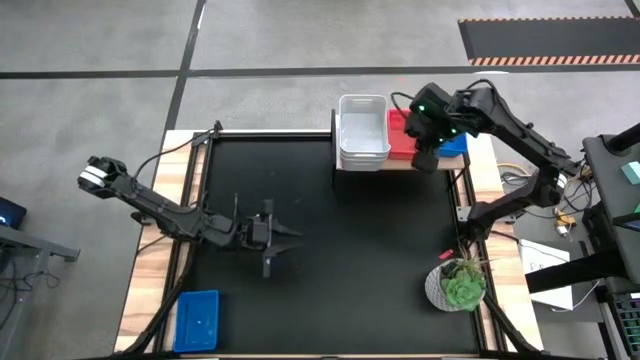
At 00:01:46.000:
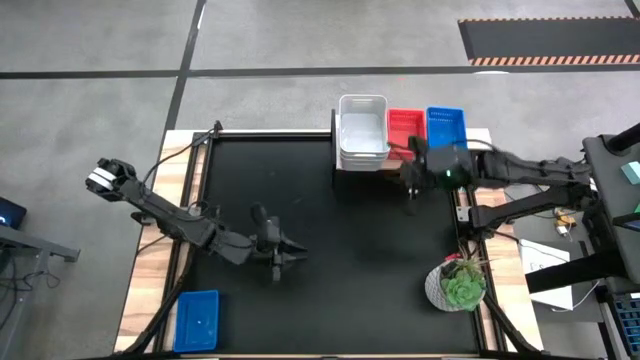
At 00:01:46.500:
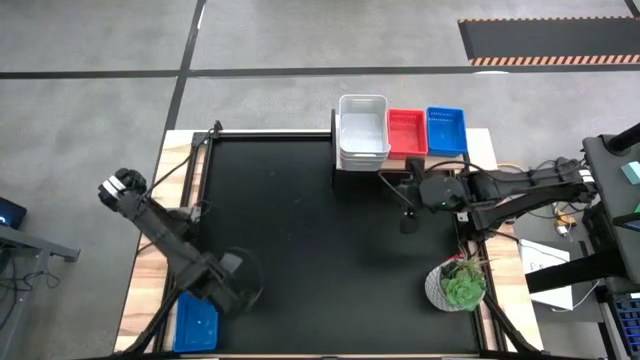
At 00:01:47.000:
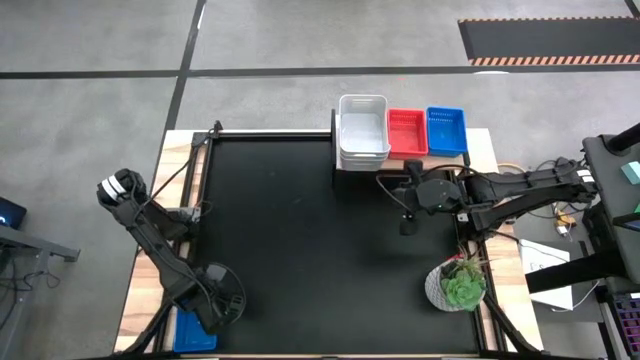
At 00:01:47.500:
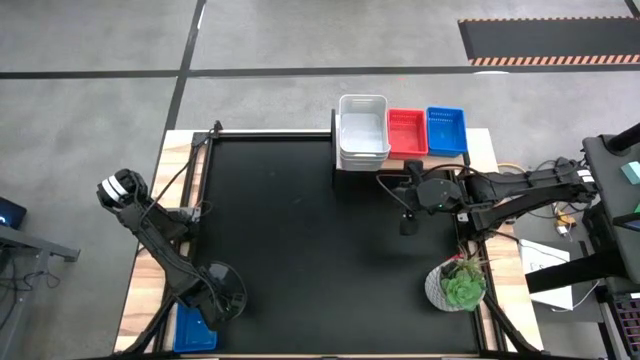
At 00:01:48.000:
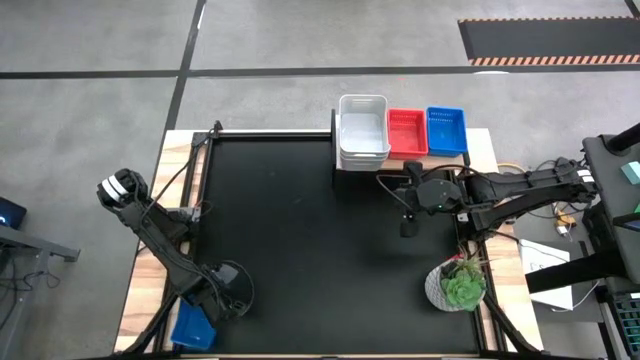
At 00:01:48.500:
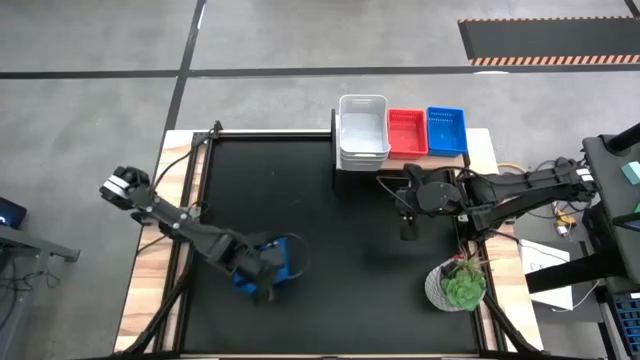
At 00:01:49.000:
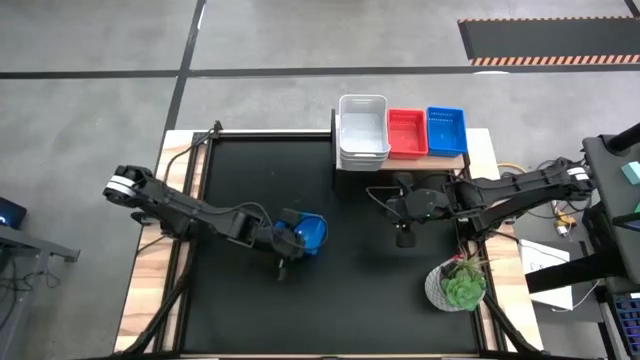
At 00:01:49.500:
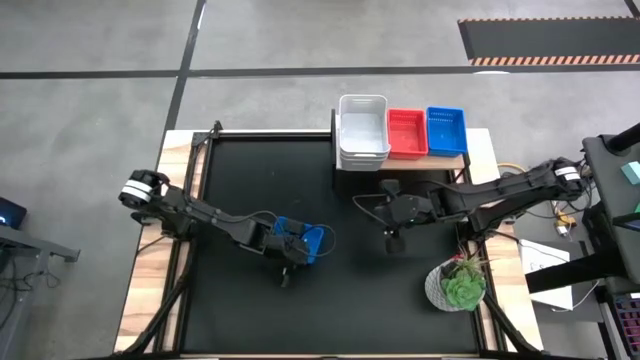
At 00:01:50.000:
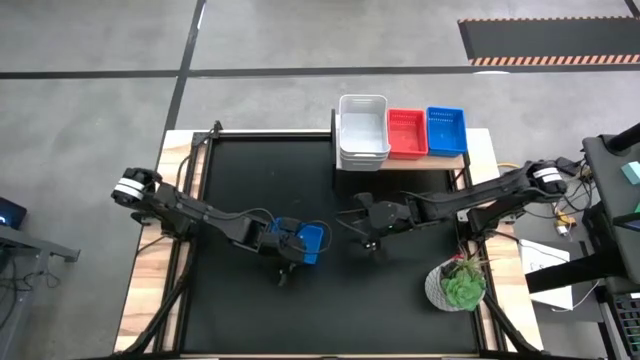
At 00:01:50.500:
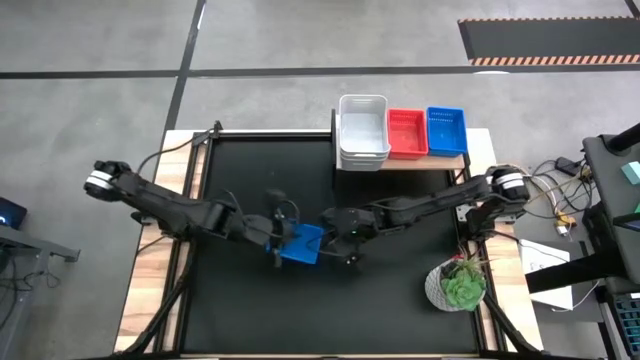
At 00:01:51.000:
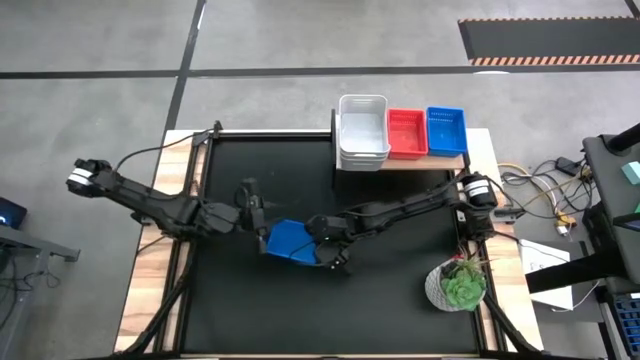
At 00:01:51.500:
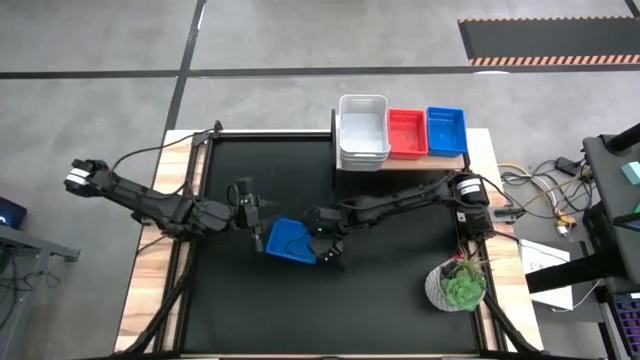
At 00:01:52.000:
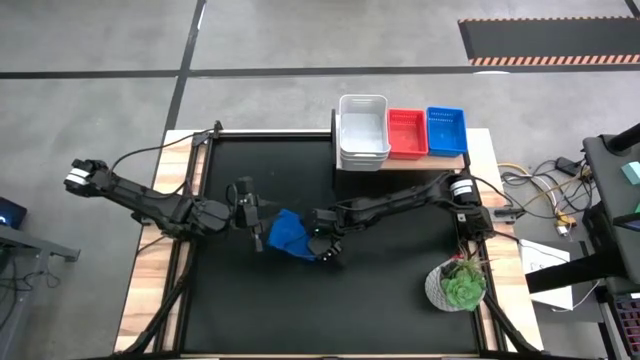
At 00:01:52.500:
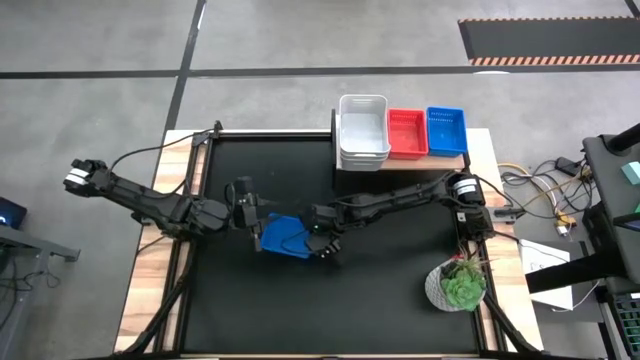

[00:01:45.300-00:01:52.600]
Task: Stack baskets on shelf by color
Stack the blue bin on top of the blue bins on the shelf

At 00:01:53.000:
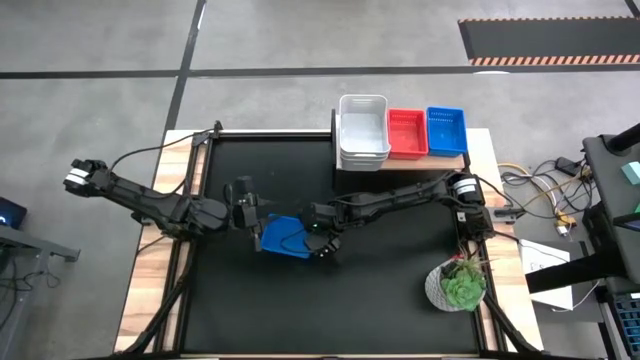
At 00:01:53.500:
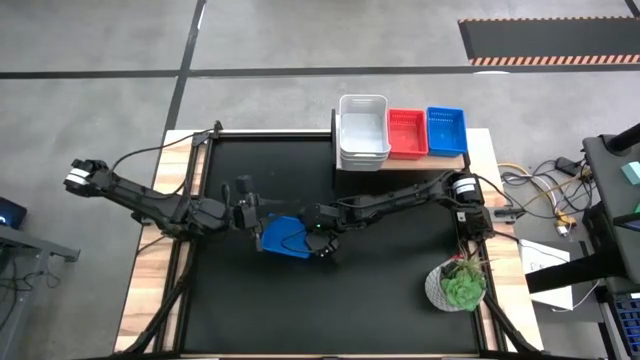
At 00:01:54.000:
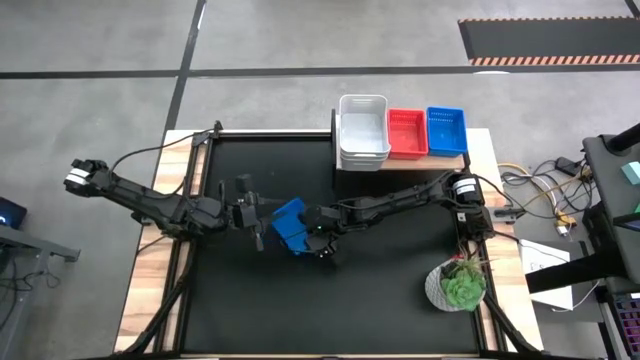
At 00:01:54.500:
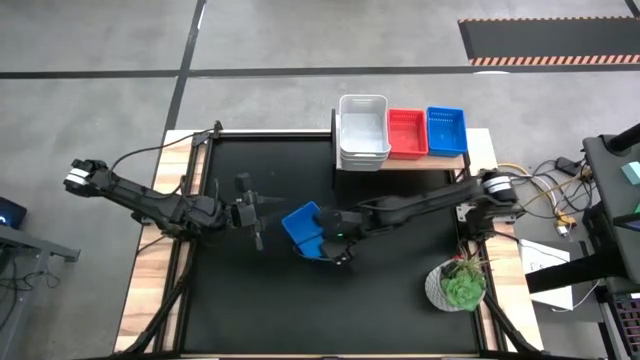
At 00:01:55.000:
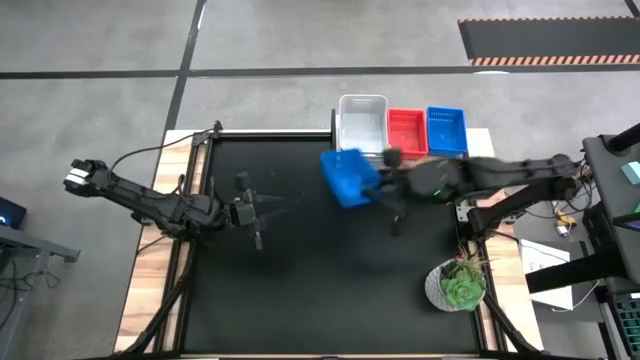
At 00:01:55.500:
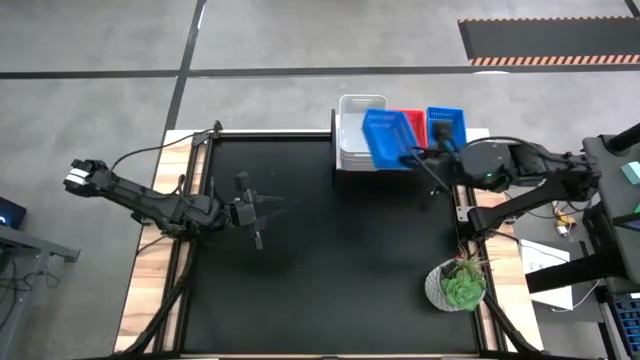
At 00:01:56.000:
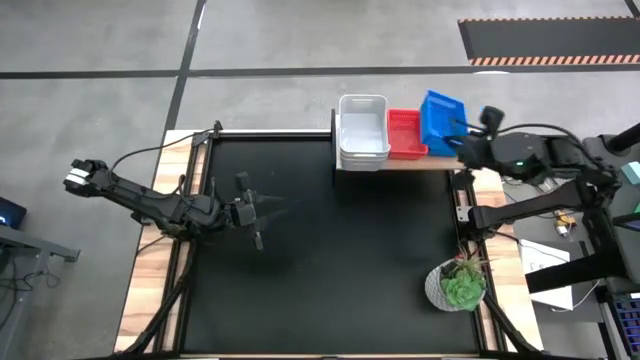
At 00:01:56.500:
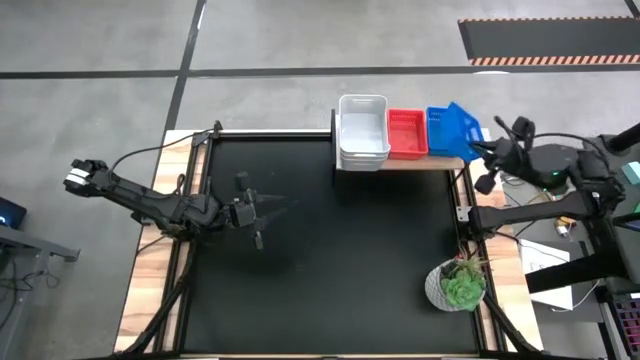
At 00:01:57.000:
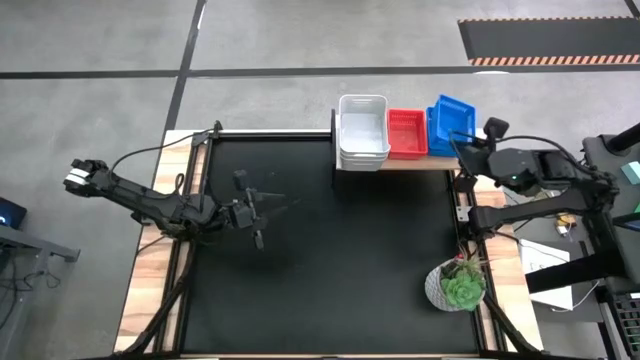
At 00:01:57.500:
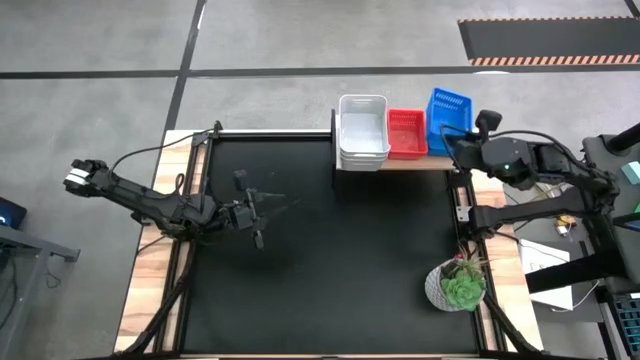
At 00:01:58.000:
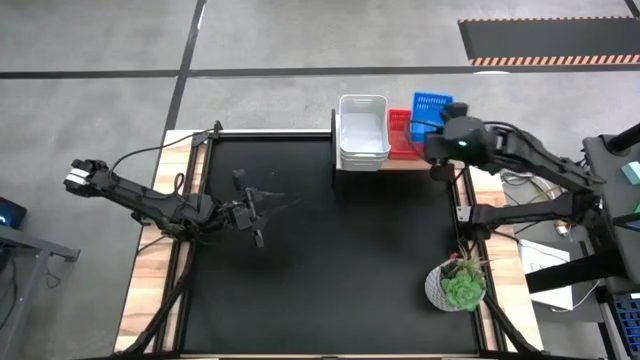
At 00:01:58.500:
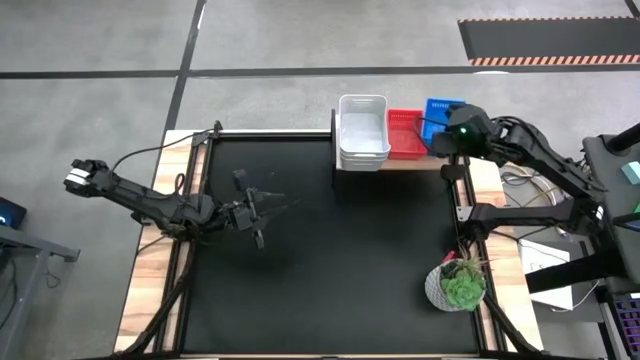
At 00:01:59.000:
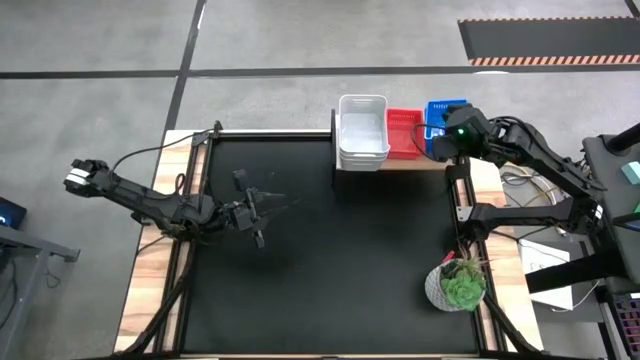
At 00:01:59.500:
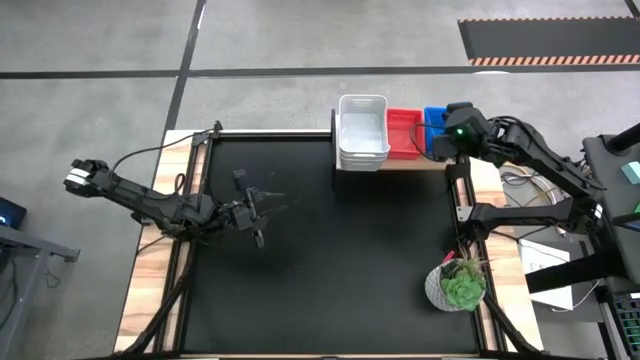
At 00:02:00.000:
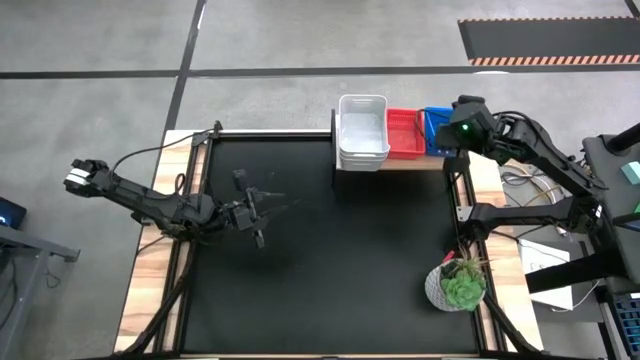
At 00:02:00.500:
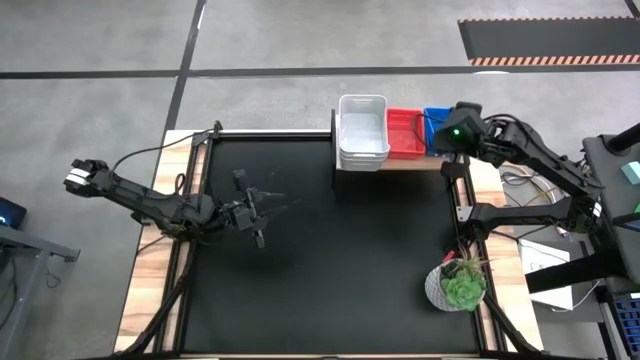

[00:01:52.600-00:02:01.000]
Stack the blue bin on top of the blue bins on the shelf

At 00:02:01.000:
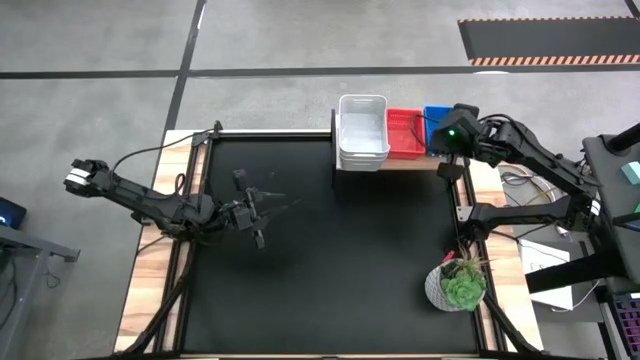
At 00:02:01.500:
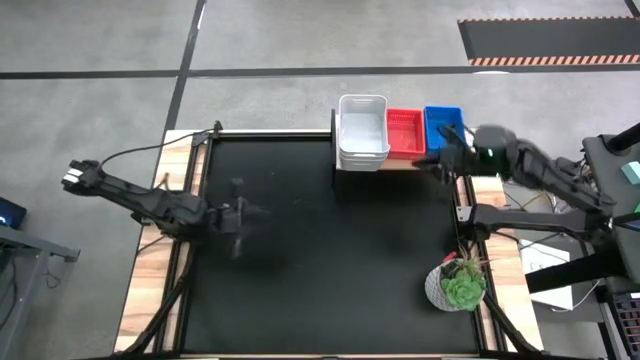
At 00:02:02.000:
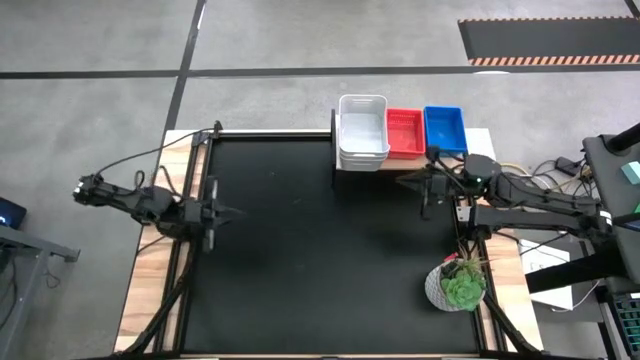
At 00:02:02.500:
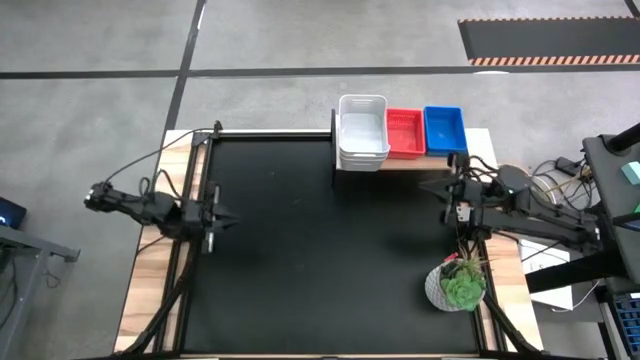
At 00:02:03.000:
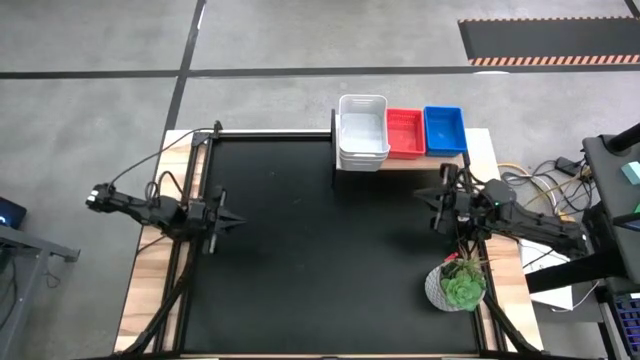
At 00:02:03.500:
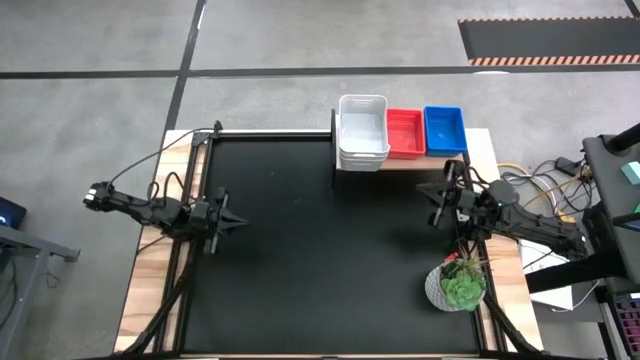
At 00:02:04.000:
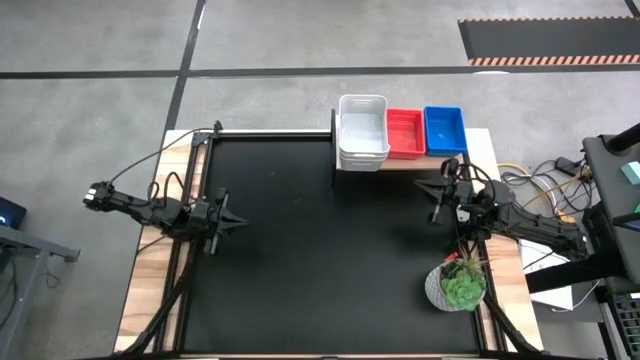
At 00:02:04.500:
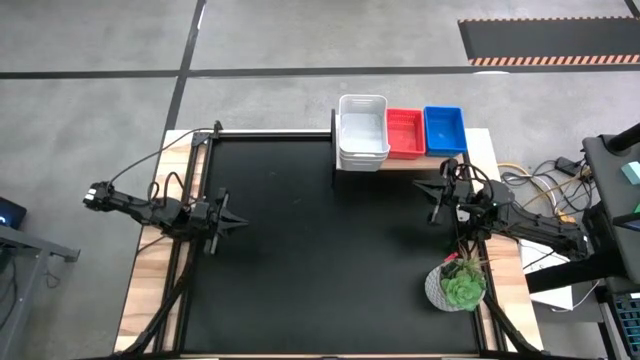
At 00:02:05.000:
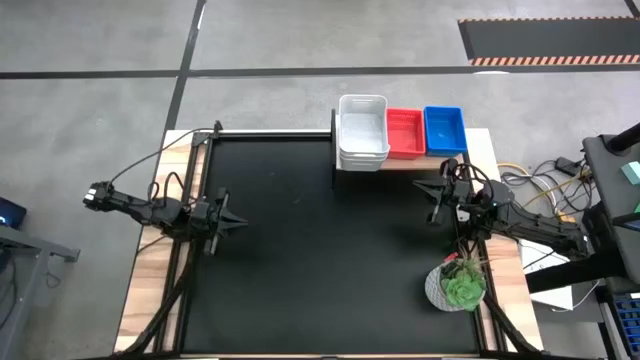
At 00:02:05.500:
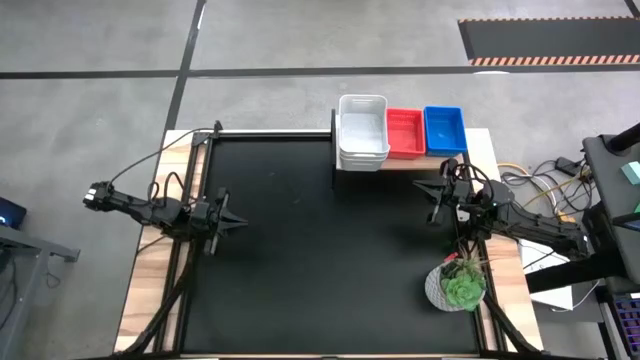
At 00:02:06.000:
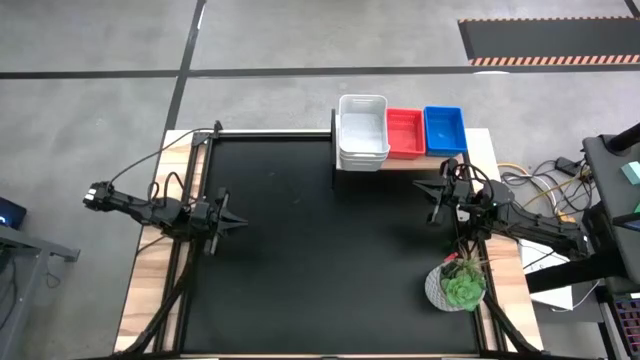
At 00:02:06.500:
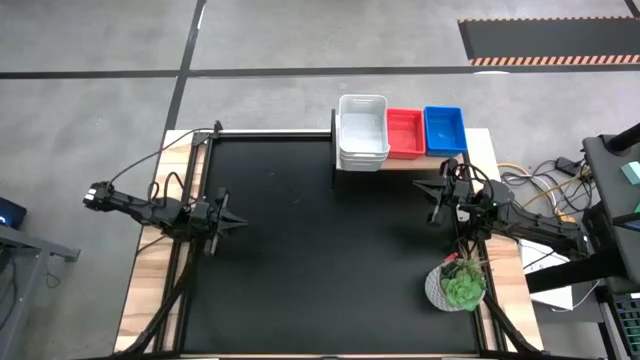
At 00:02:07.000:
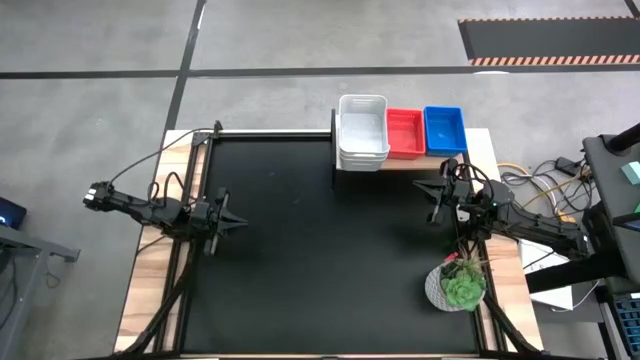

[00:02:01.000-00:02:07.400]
Return to Home Position
